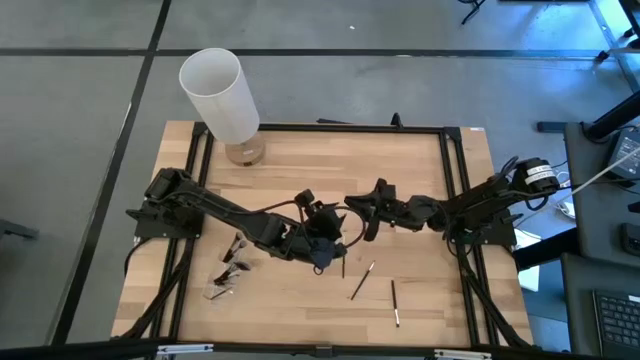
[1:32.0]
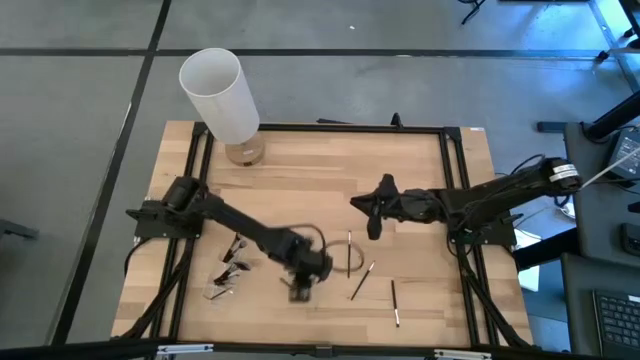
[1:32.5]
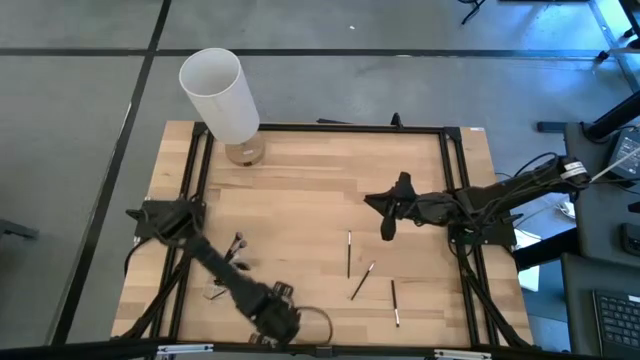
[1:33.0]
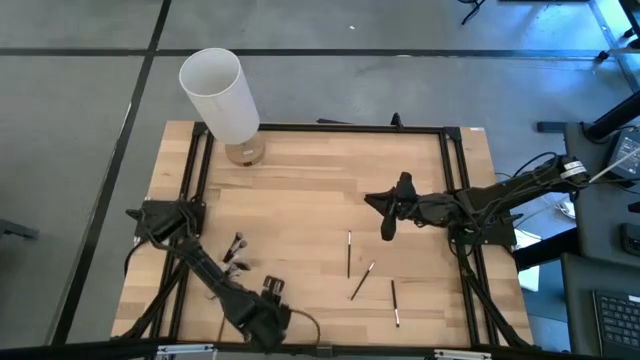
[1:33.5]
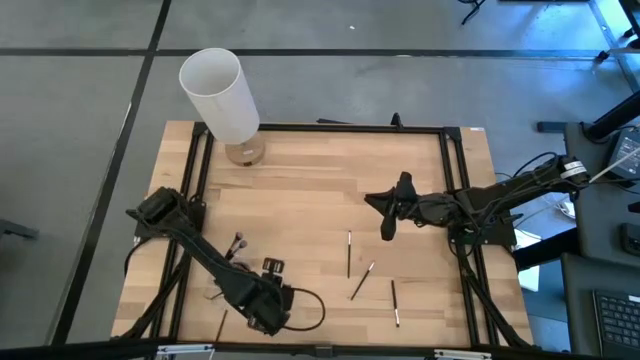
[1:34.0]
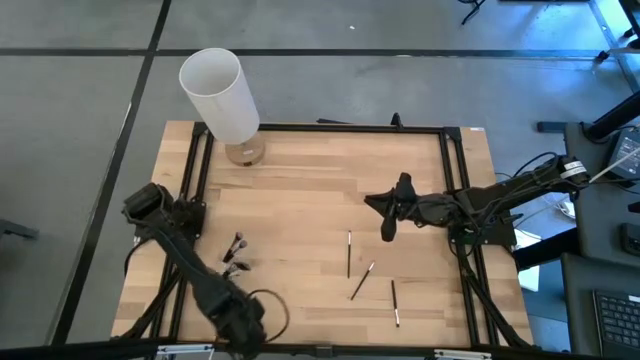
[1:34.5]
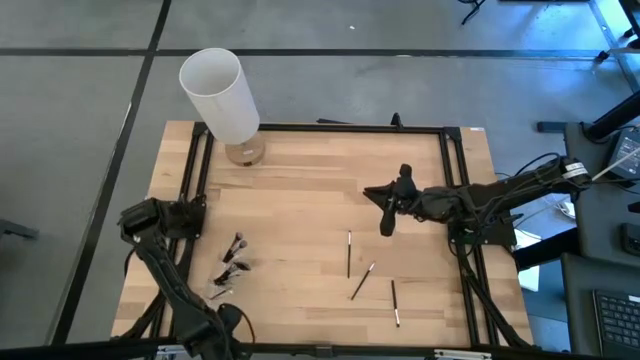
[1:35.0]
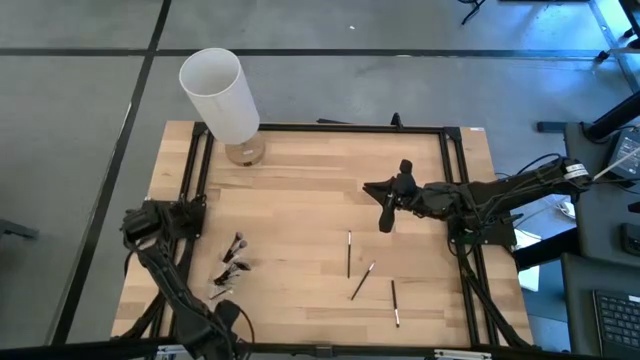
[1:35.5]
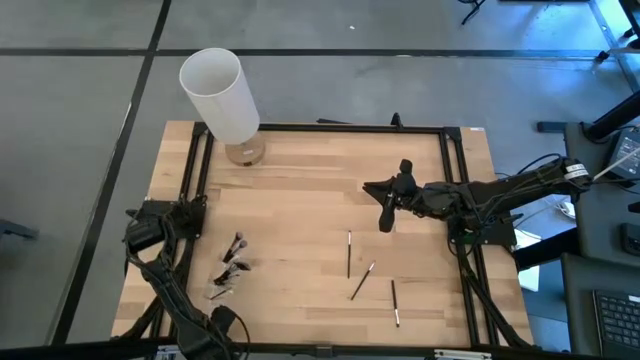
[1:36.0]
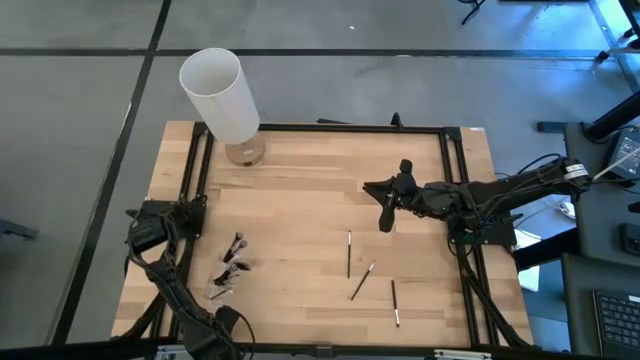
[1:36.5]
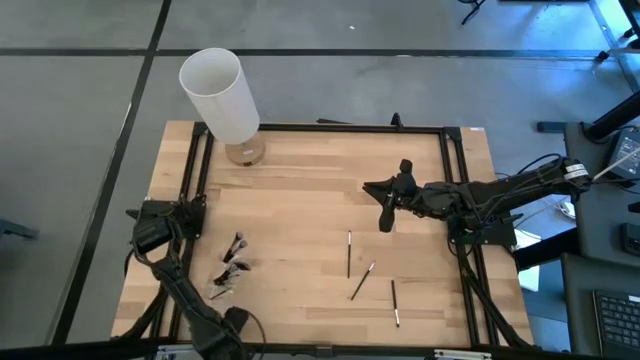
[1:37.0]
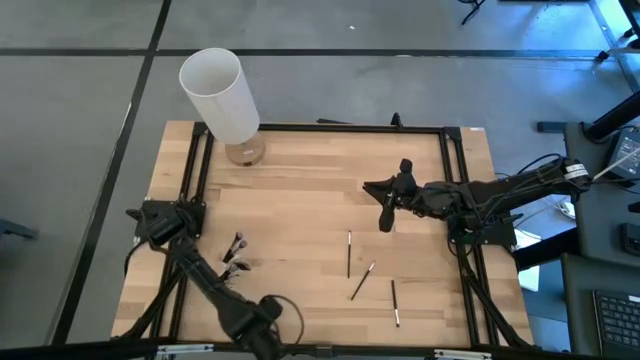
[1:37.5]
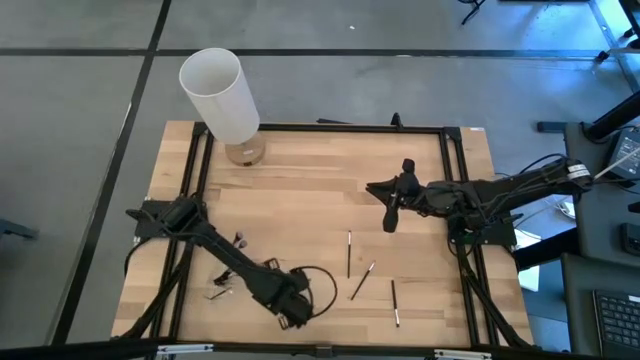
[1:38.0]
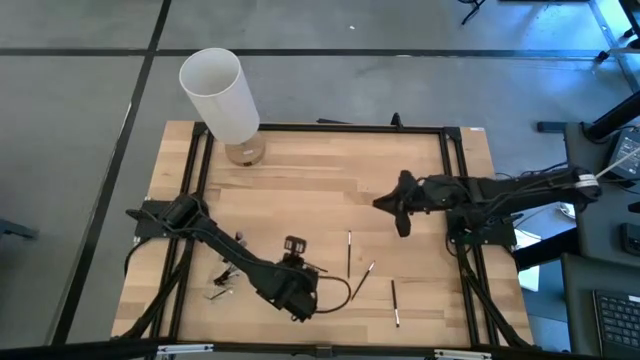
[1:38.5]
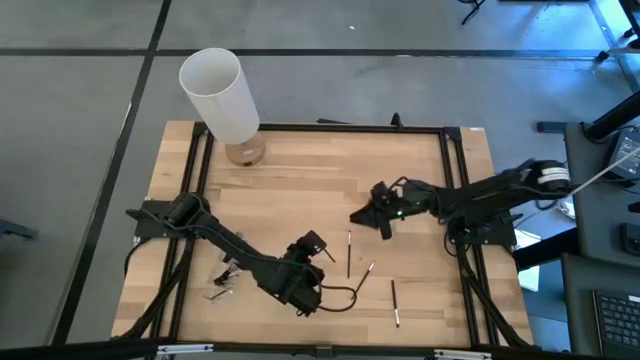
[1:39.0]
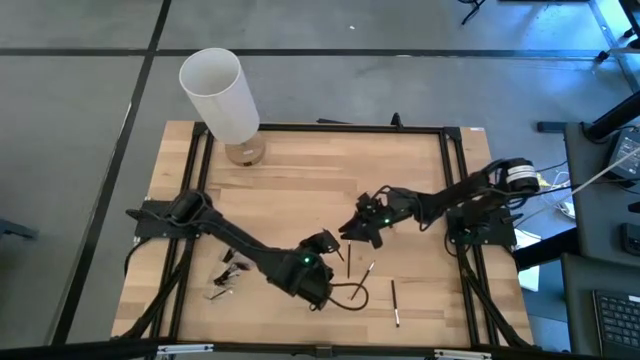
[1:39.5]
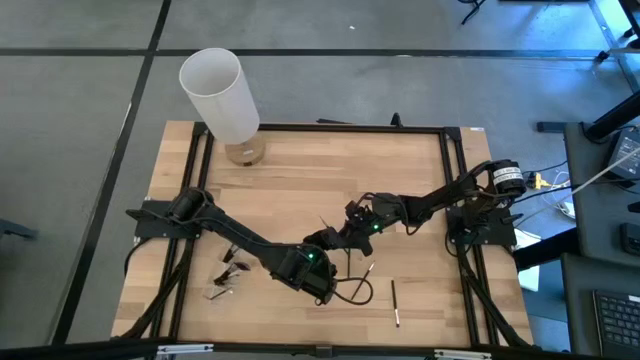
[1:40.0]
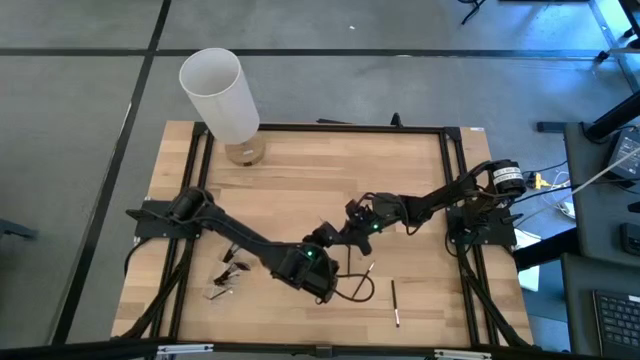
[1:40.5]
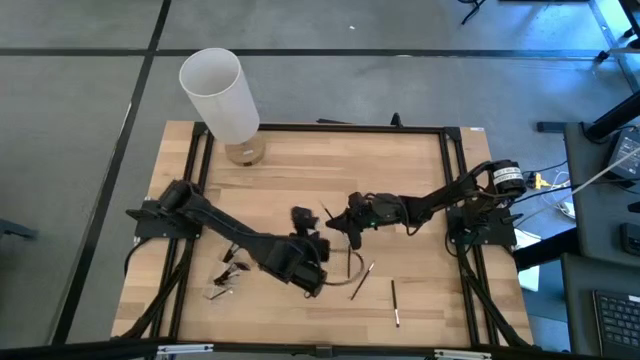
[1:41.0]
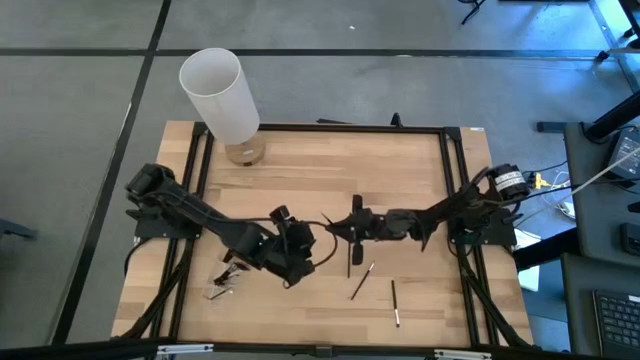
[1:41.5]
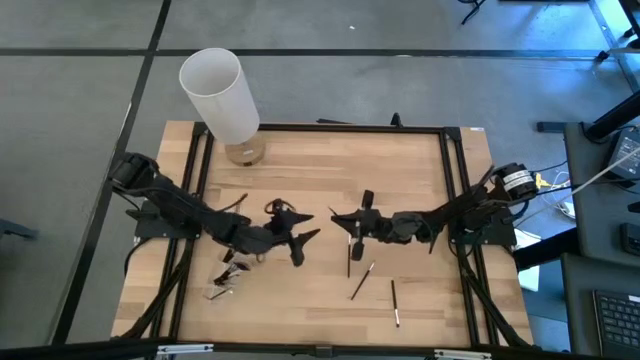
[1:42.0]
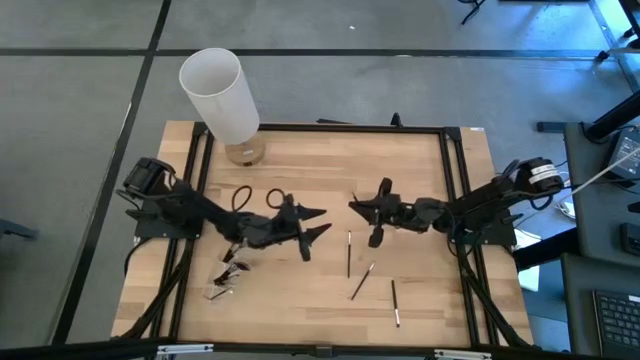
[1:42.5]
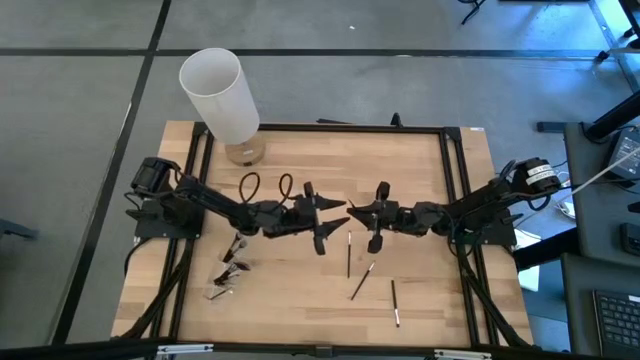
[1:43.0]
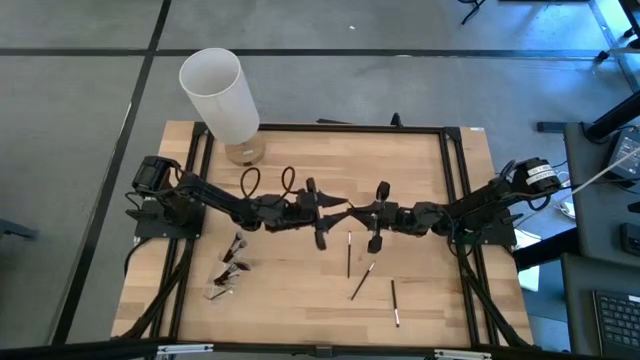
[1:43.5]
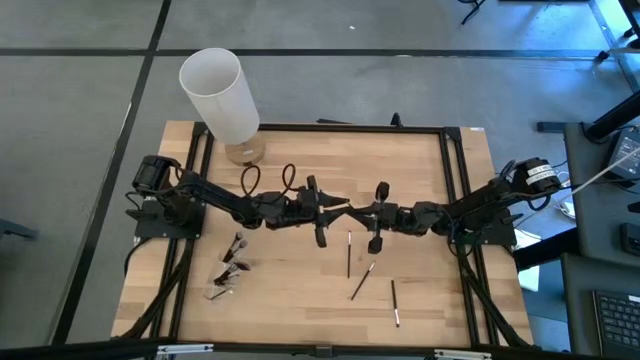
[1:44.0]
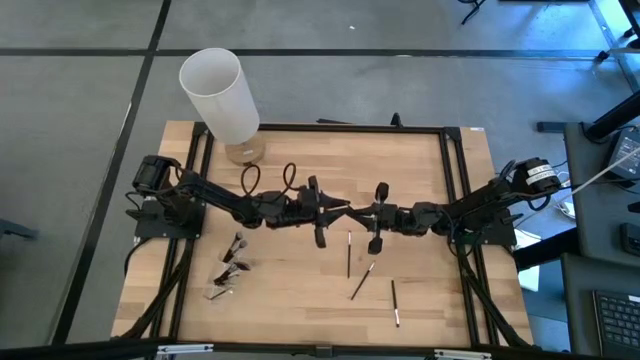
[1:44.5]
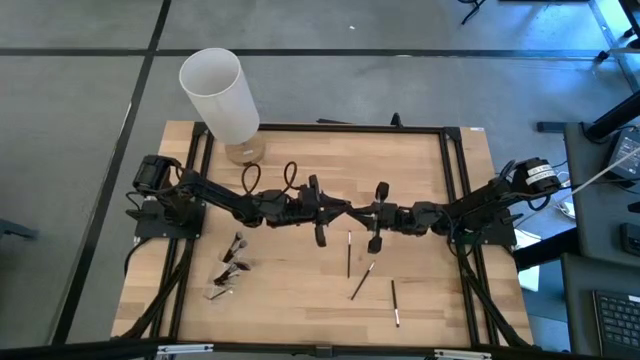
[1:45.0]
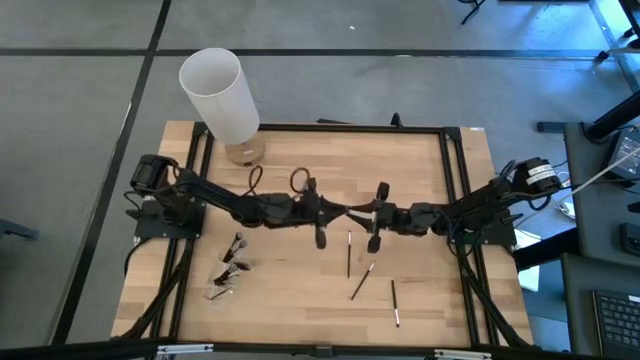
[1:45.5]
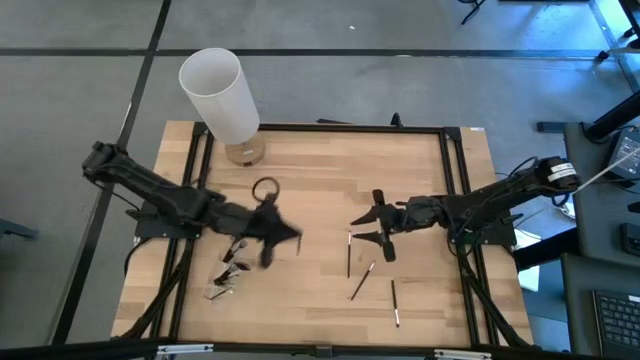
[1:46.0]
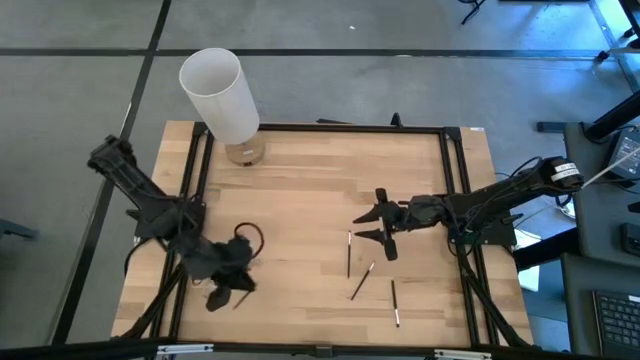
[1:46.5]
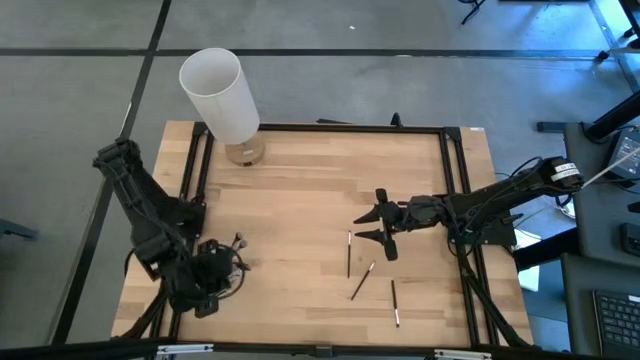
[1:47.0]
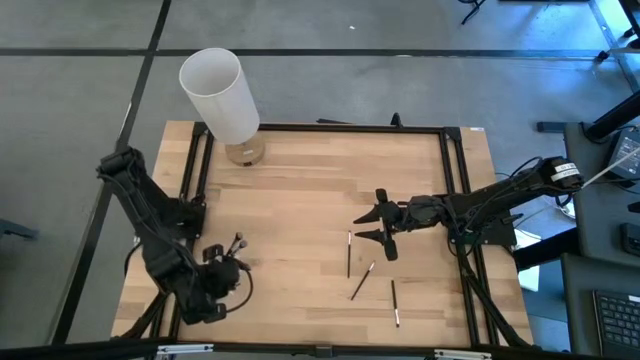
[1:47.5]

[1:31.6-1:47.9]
Task: Put items in baskets/containers
Put the black eyeshadow brush into the transparent organizer

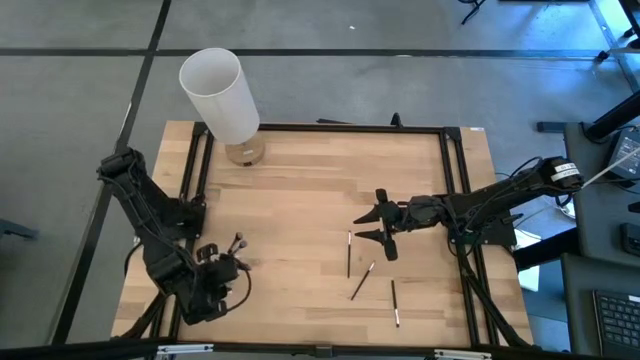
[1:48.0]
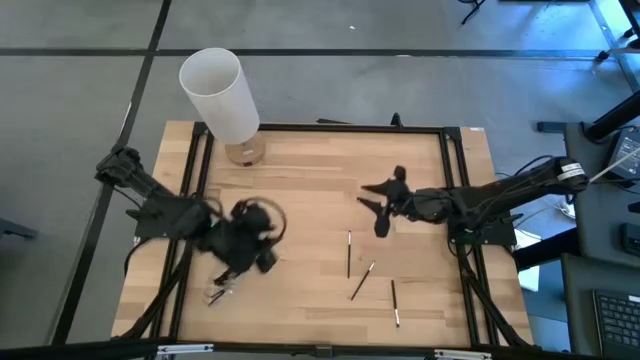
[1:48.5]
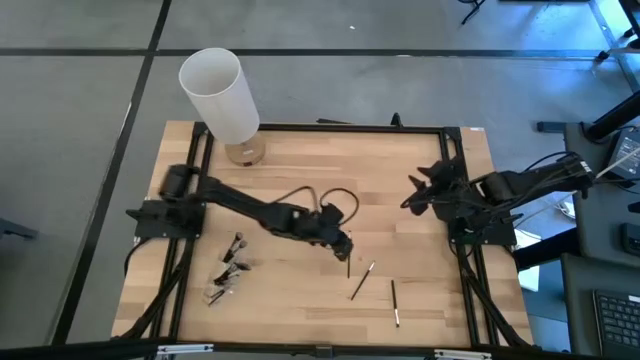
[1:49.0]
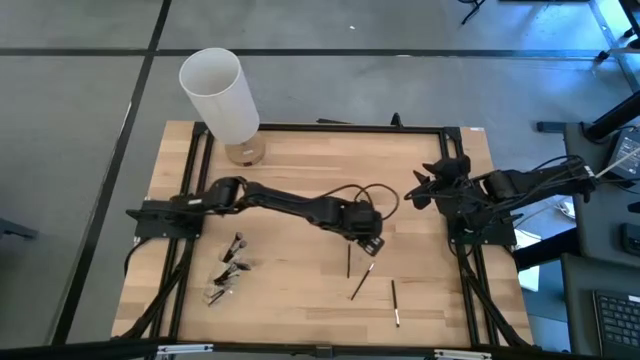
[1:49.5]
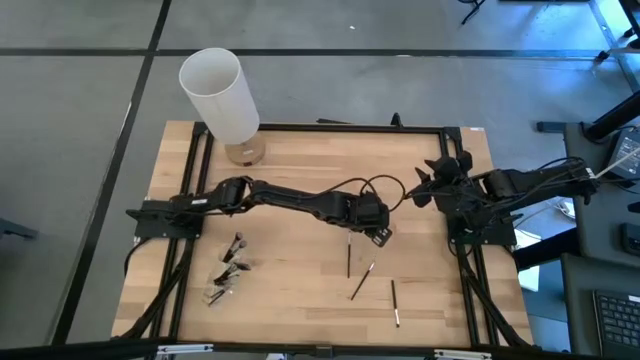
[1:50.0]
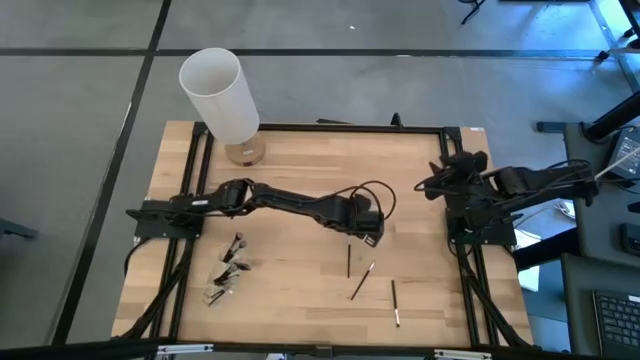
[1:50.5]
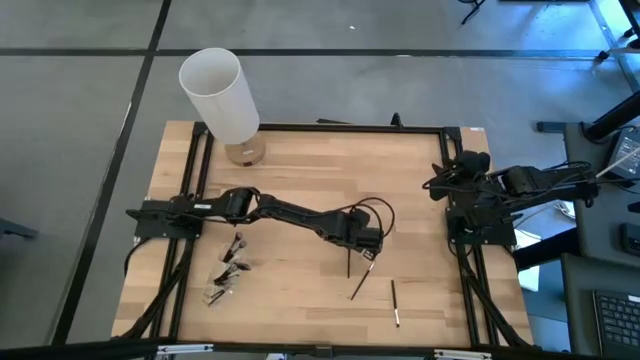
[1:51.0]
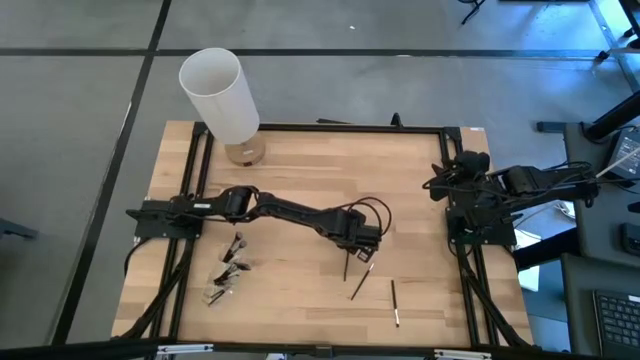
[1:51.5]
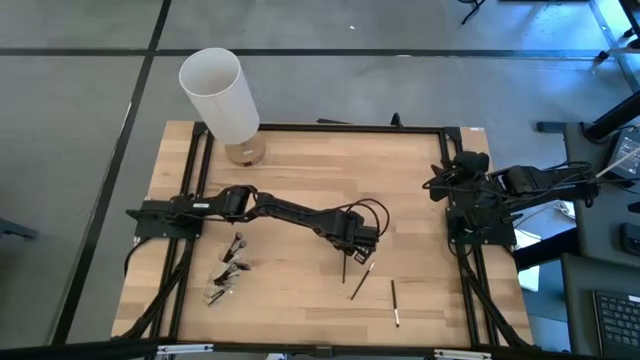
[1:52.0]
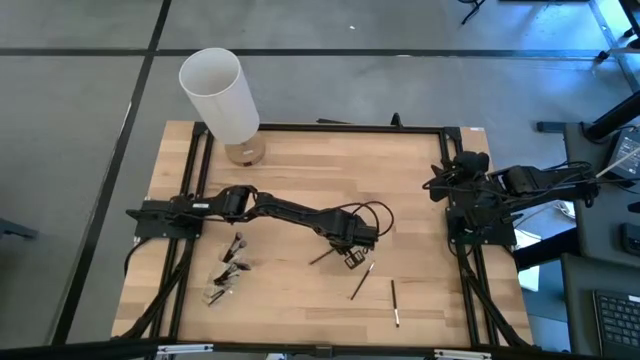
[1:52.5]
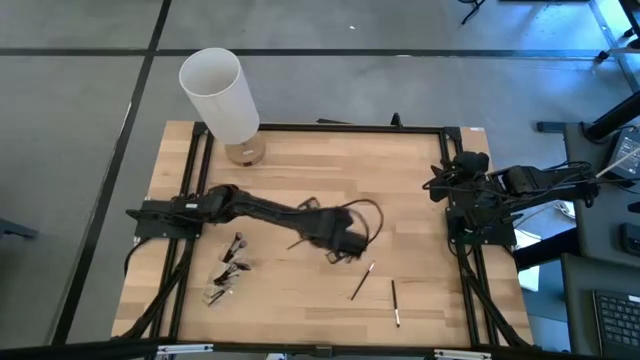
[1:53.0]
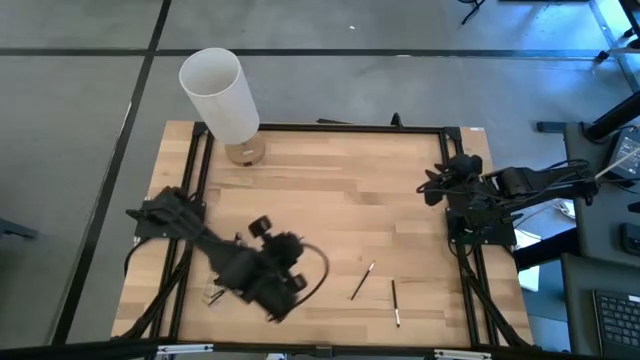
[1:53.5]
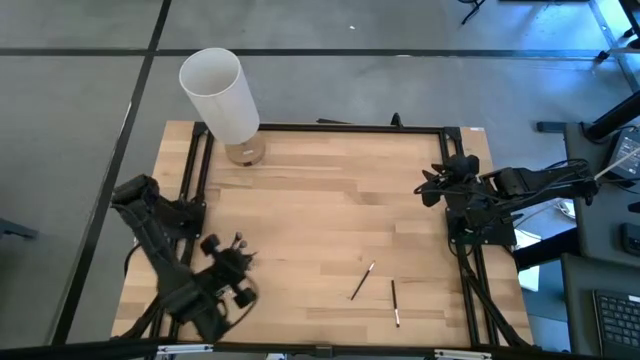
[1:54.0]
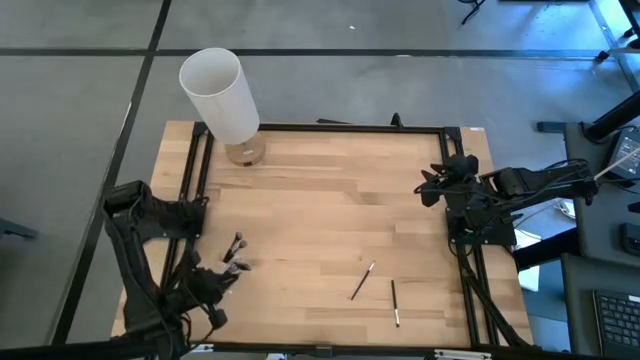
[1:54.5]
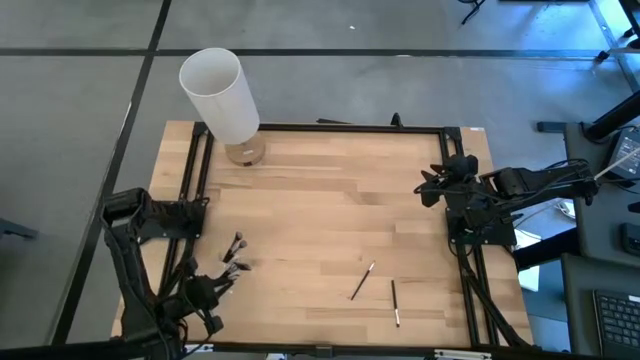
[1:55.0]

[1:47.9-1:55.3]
Put the black eyeshadow brush into the transparent organizer
